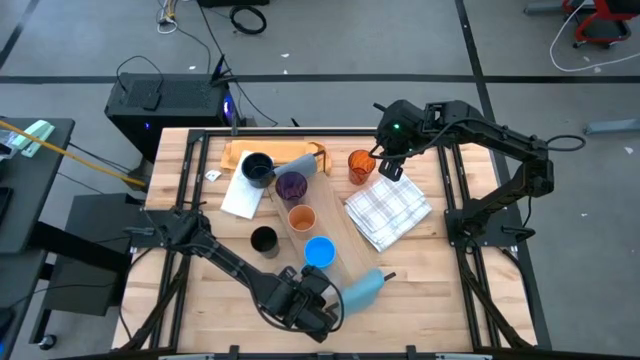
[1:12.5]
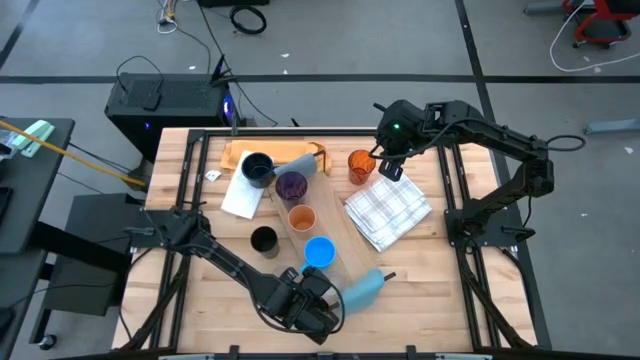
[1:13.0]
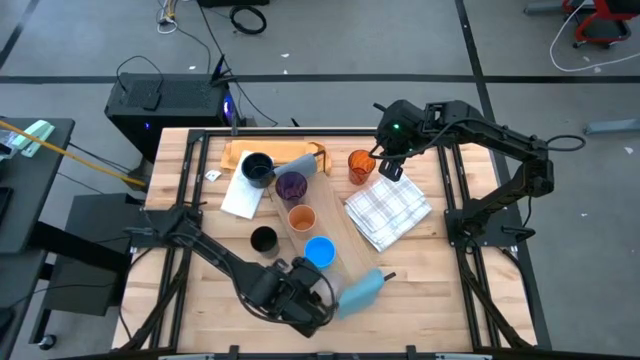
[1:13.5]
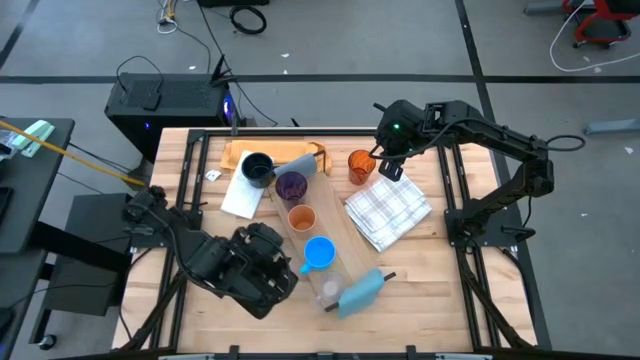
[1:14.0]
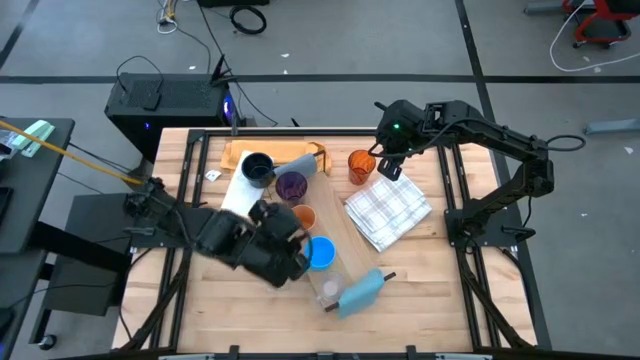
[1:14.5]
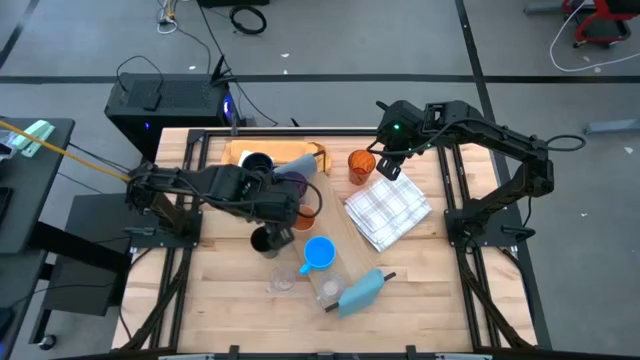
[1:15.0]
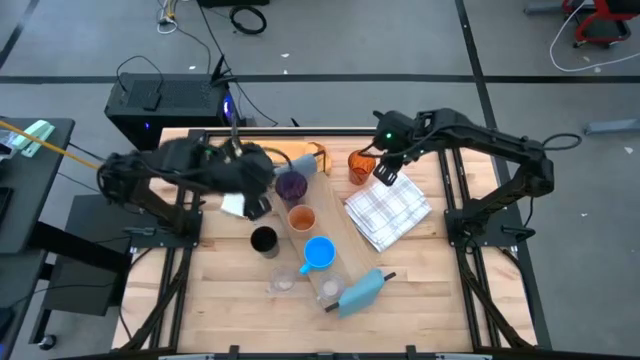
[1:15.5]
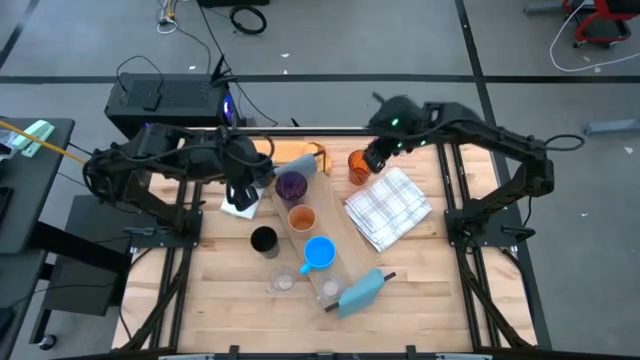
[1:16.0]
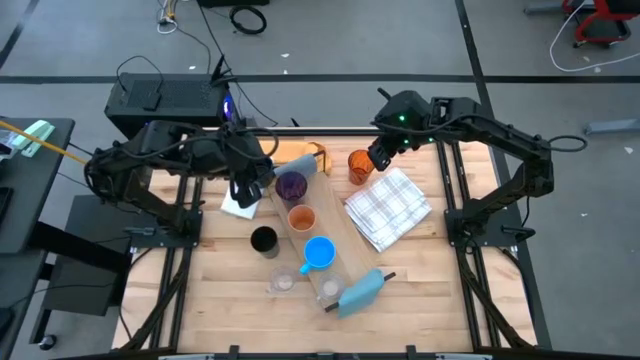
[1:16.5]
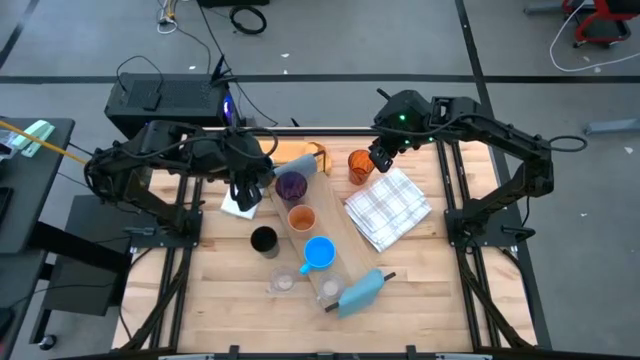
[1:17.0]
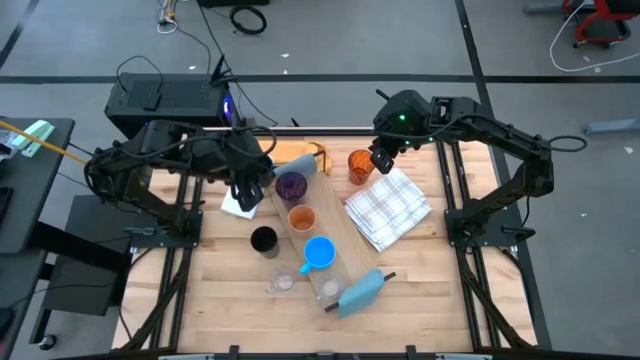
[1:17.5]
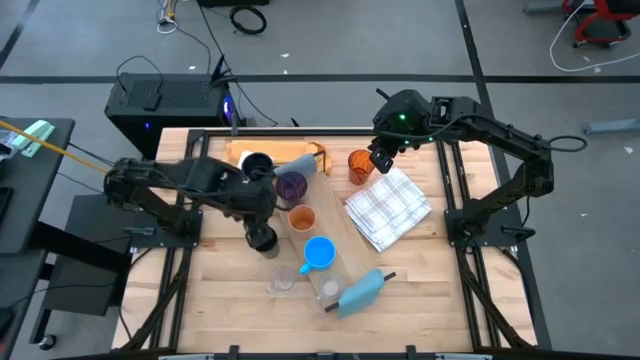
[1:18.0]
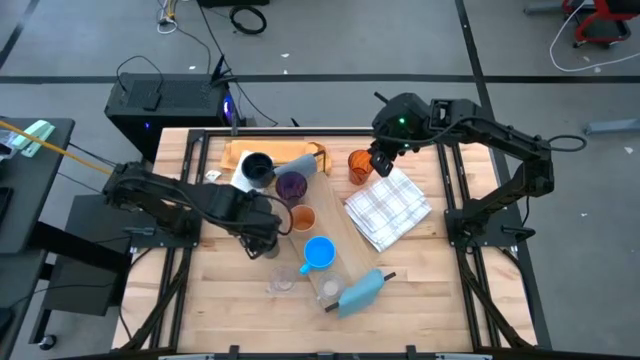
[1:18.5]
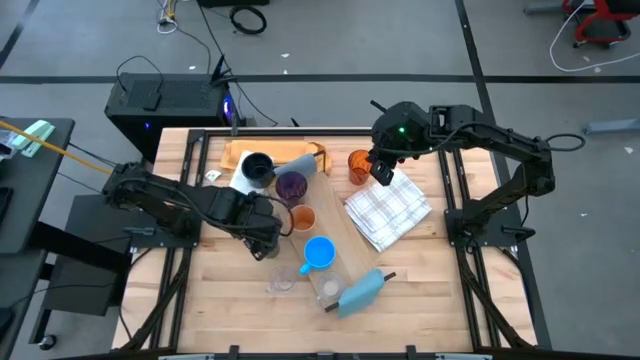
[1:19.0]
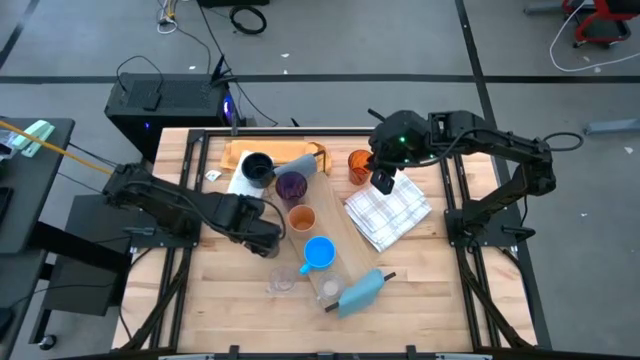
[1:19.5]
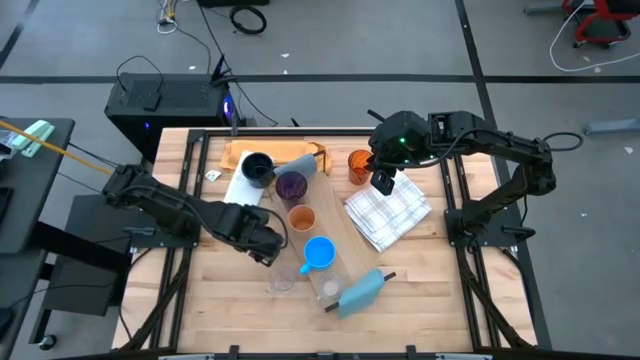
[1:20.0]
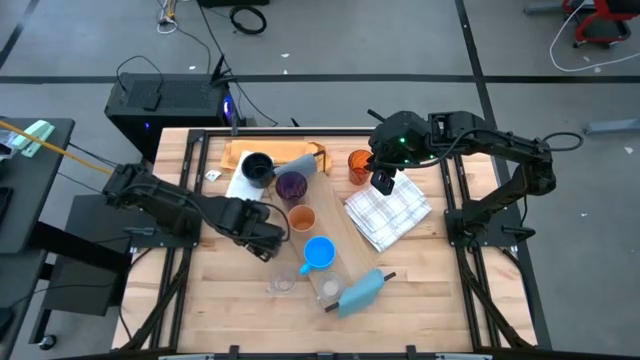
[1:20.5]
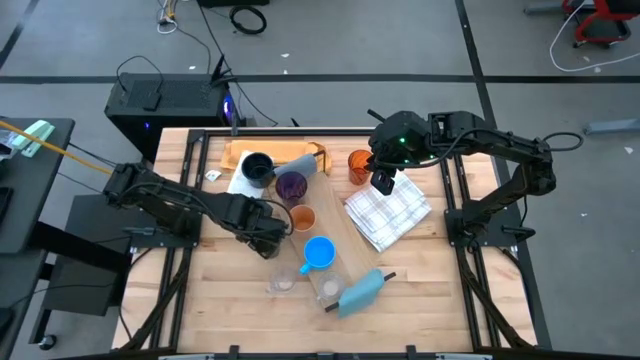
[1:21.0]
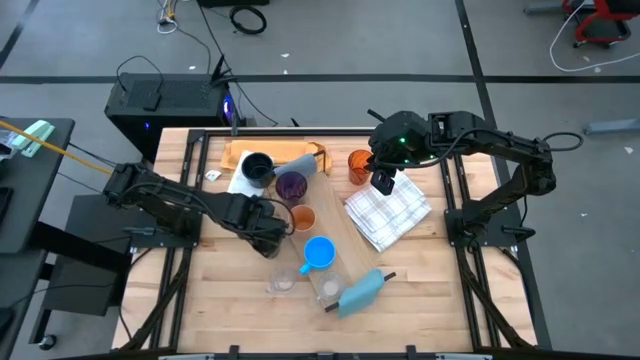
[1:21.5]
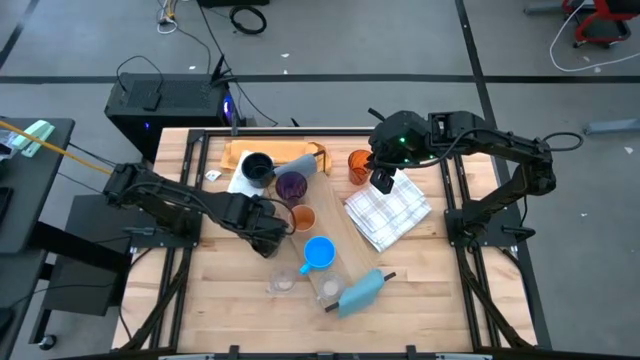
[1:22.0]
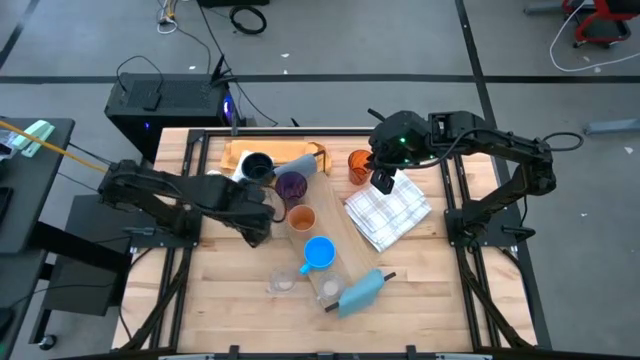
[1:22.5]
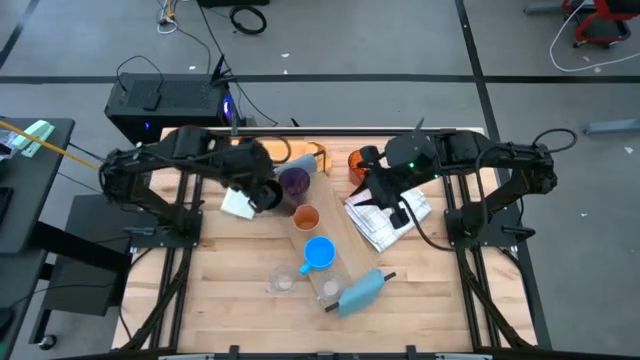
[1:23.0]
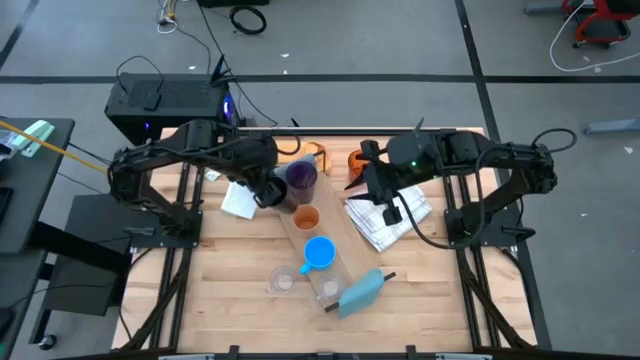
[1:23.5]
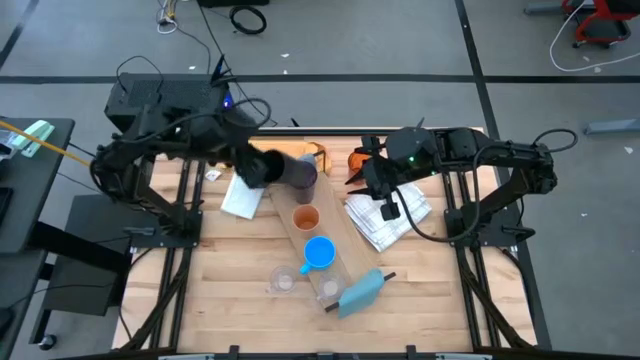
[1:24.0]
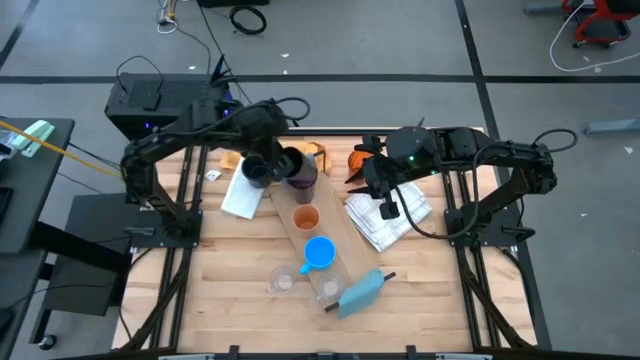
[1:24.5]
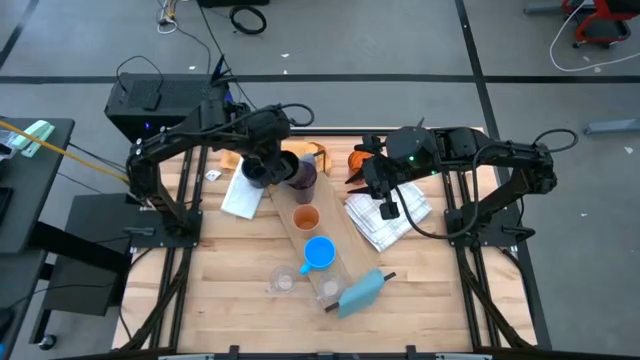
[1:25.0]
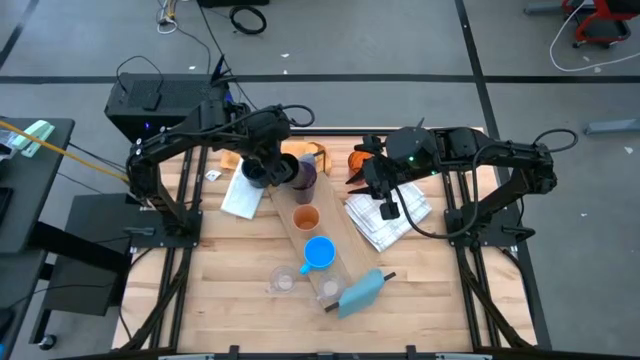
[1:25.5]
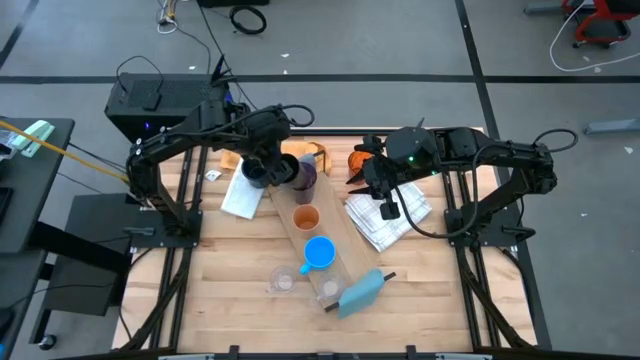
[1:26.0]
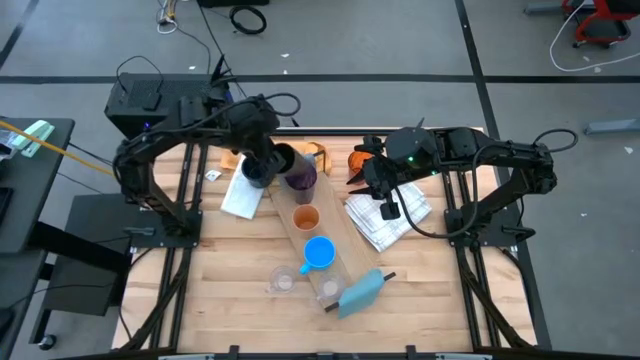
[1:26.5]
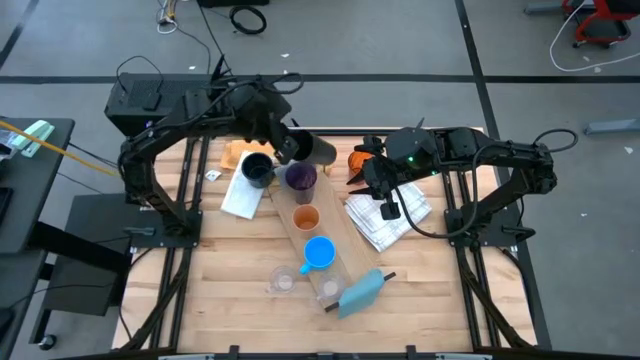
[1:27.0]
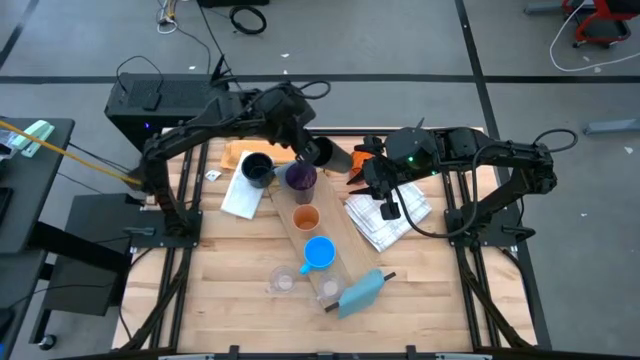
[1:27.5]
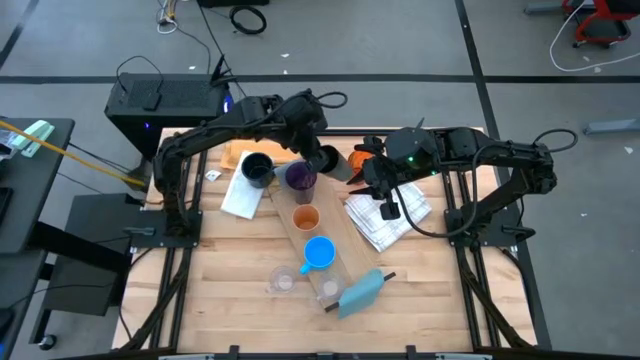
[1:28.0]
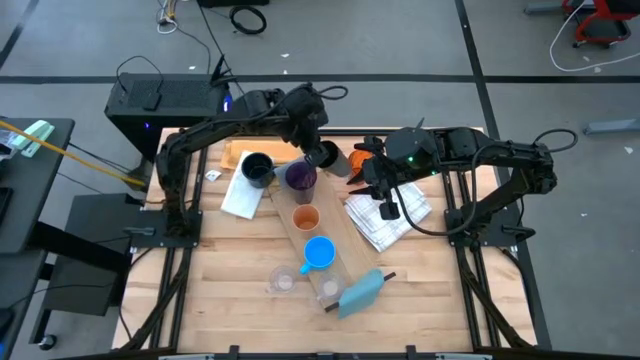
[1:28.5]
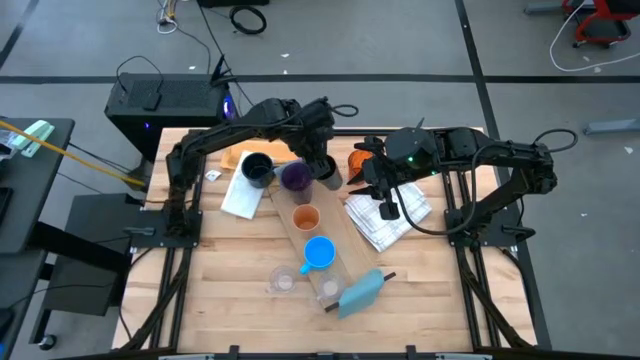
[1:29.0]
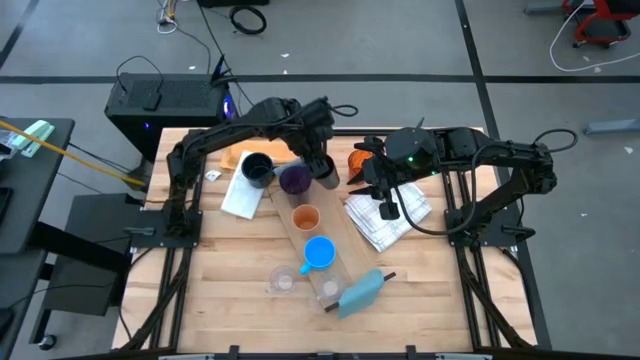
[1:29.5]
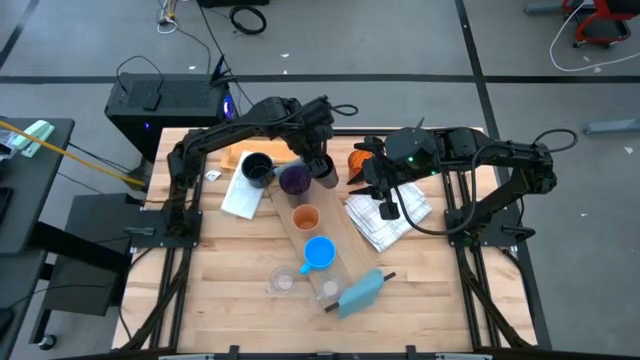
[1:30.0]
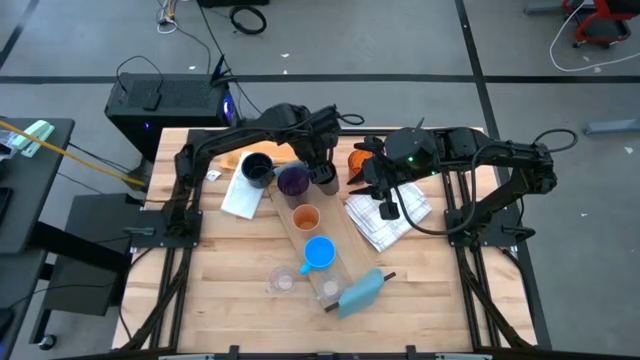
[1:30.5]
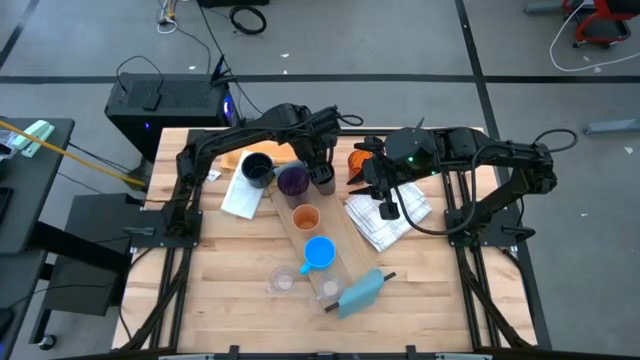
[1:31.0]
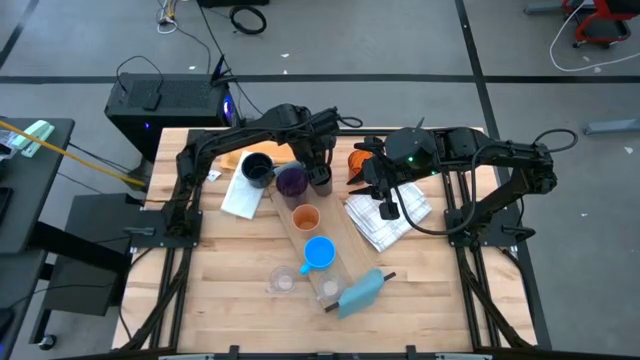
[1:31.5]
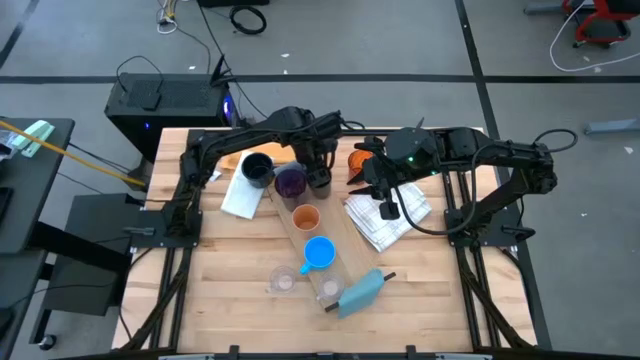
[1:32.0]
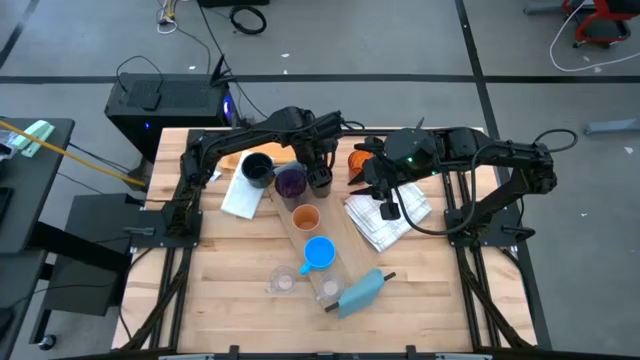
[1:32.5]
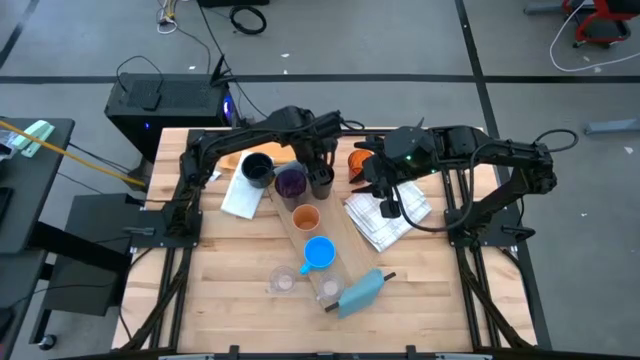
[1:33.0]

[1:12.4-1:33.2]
Task: Stack small to large cups/mugs on shelf
Put the black cup on the shelf

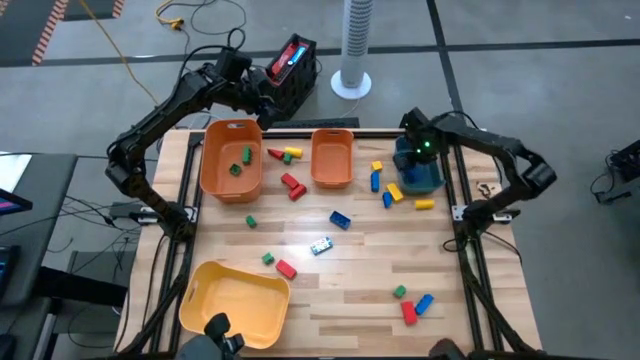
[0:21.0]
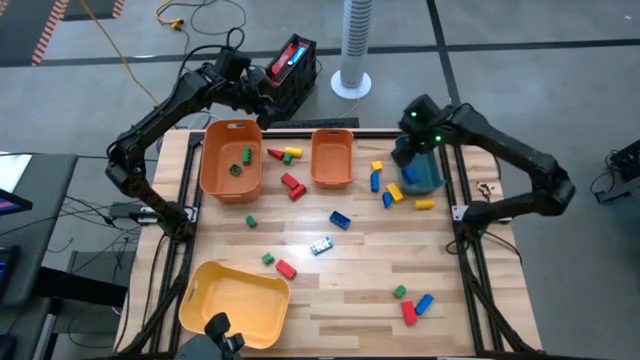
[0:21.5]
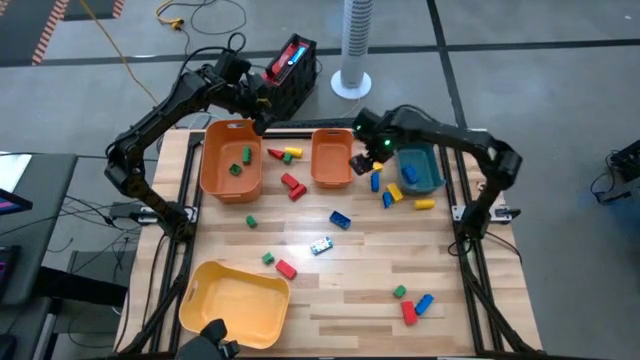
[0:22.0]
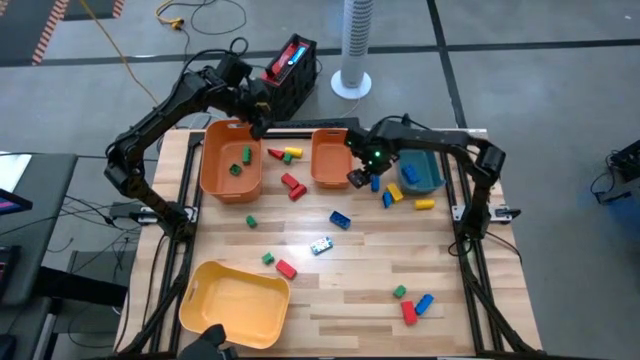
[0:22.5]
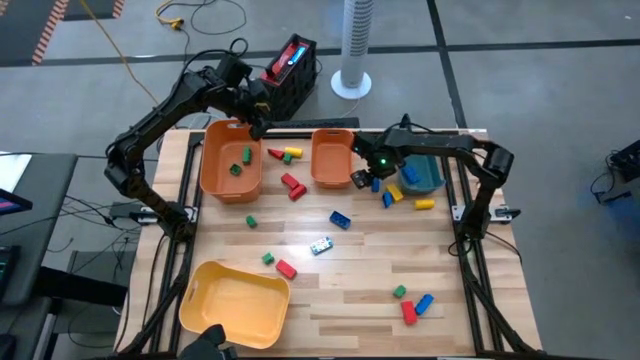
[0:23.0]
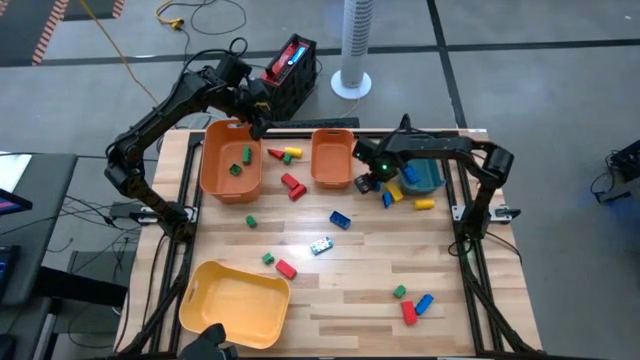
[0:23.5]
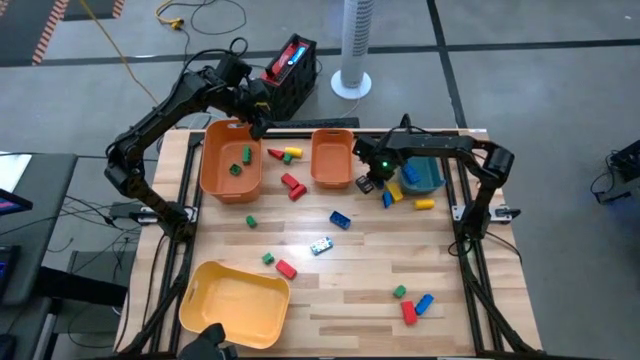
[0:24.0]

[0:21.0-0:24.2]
Task: Sort blocks
Put the blue game piece into the green bin
